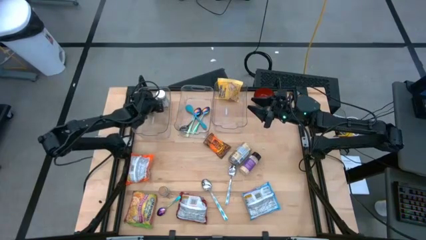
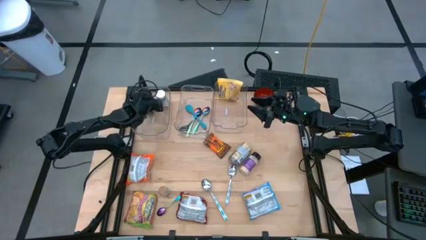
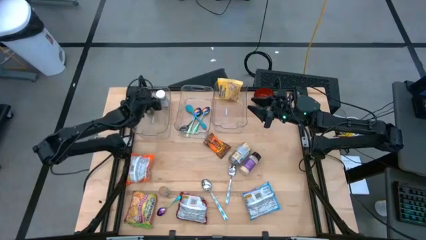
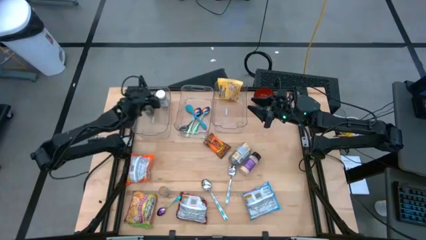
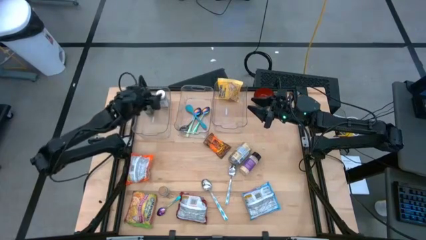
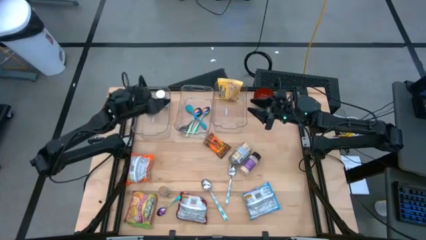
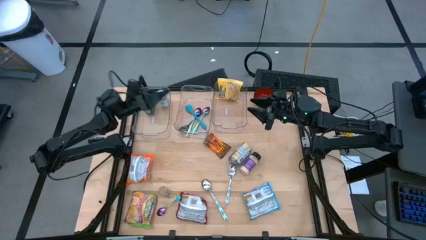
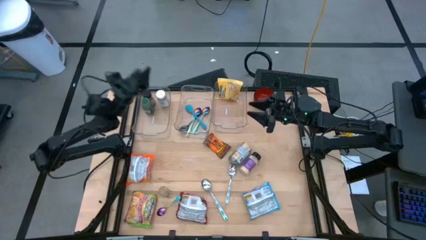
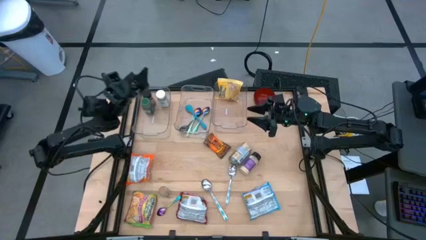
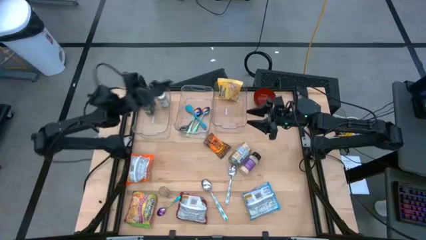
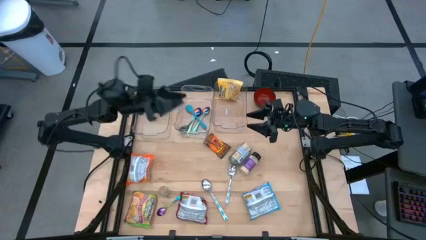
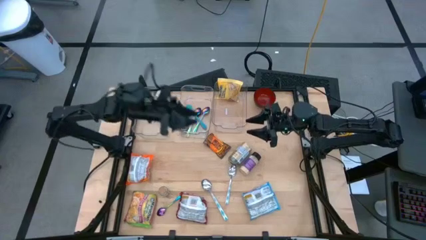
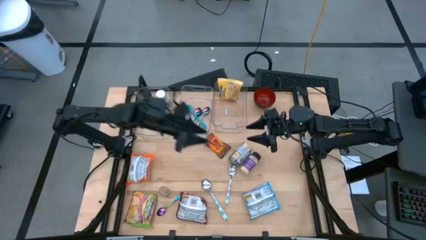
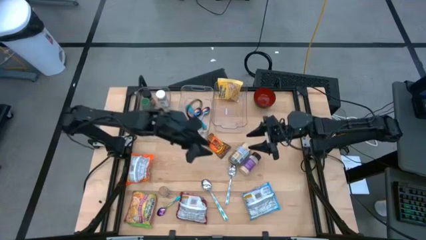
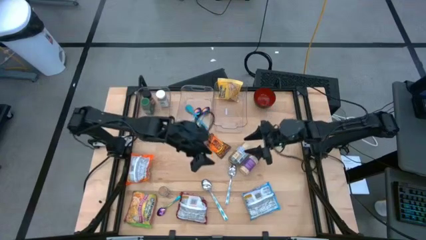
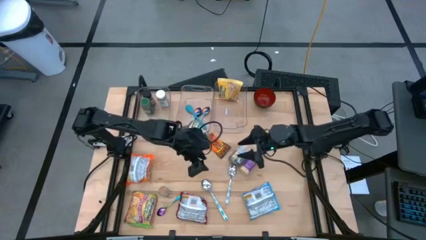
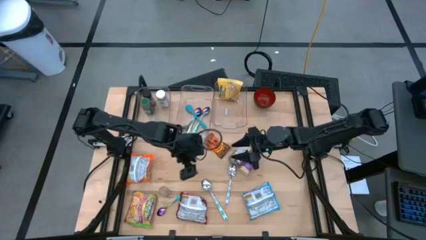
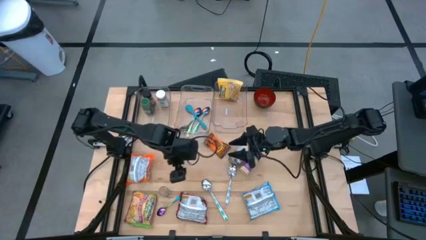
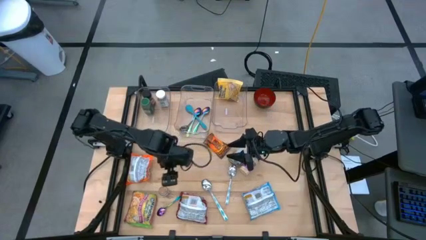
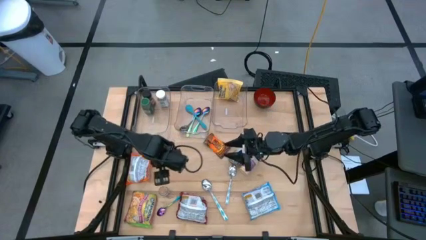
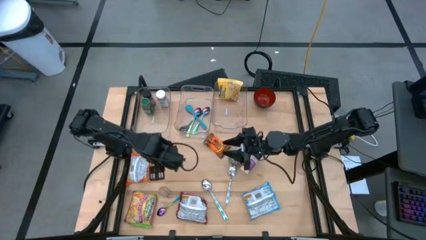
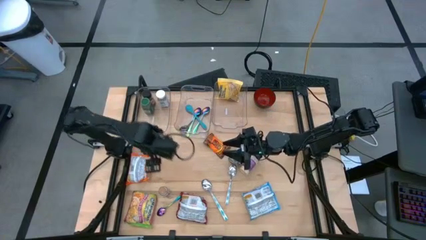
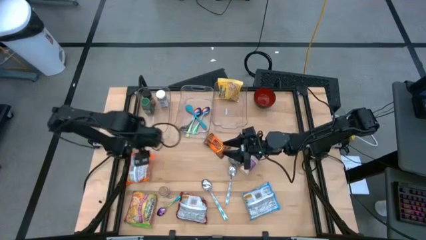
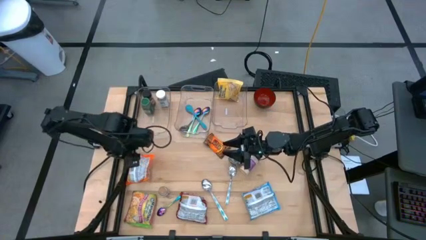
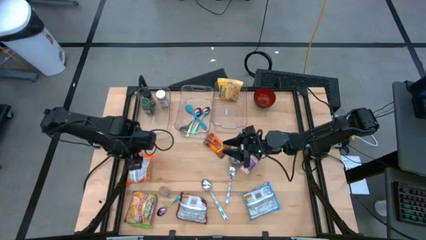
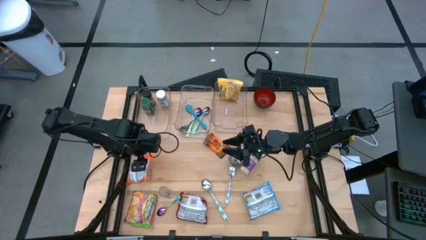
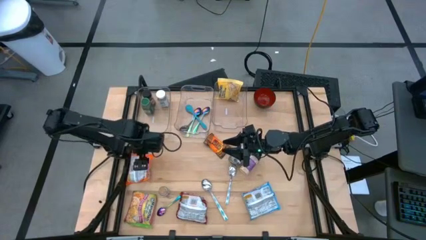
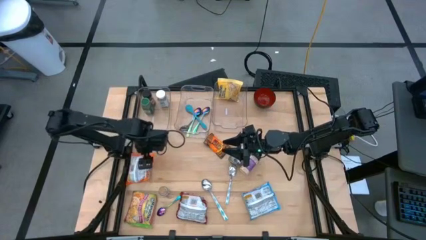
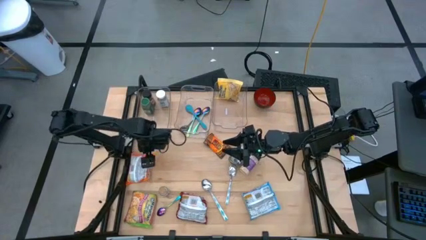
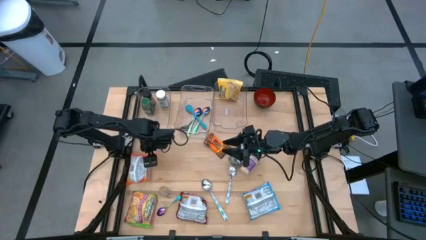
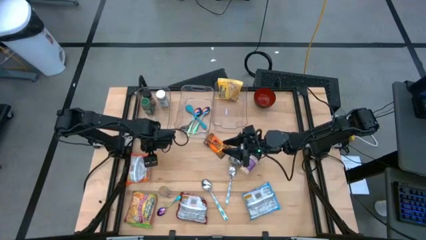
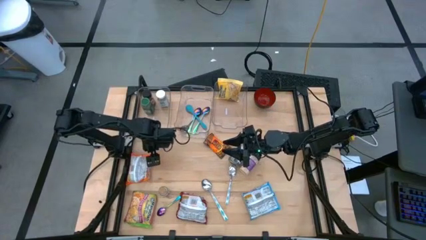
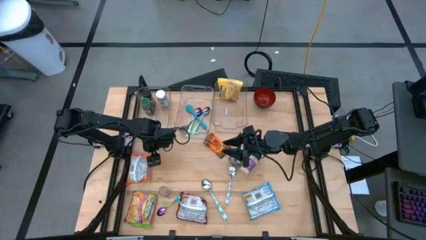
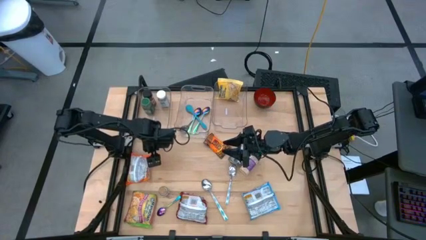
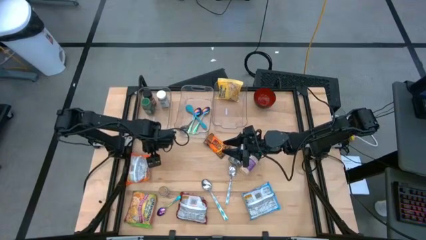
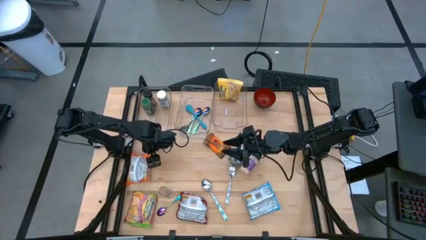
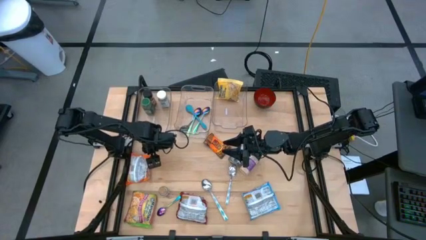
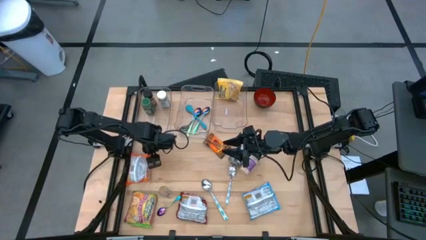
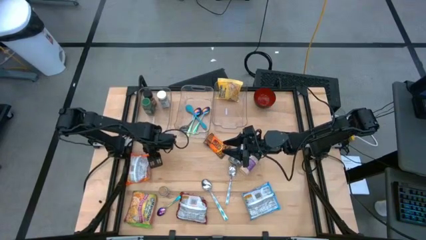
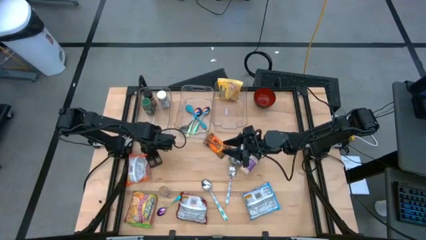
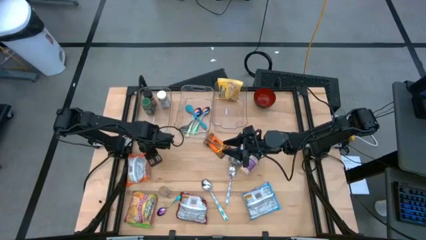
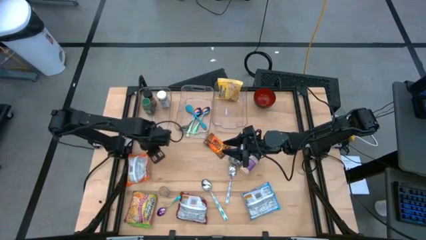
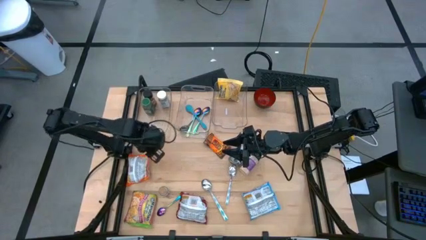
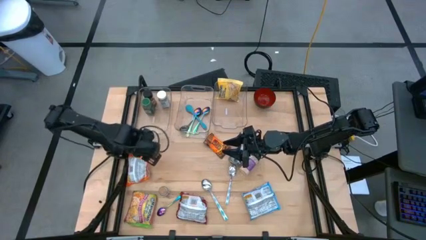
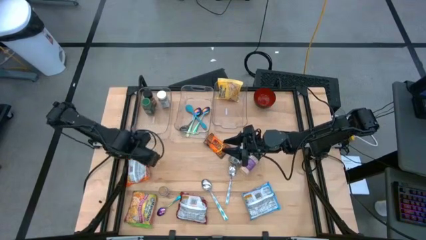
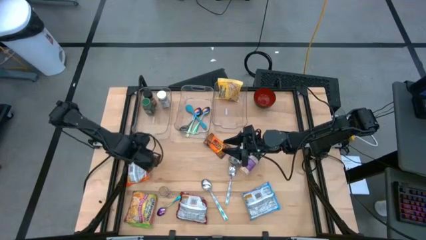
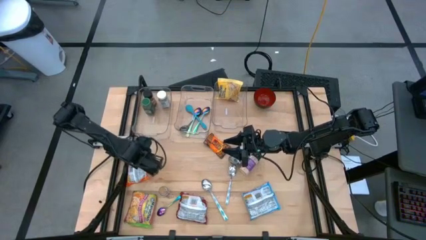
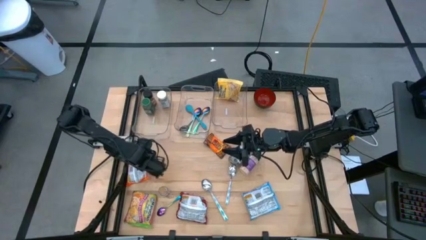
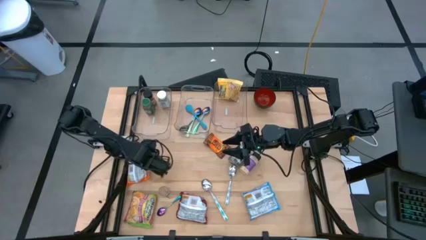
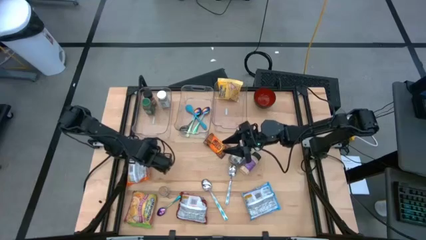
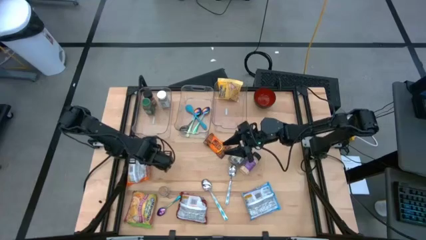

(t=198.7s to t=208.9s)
Task: Pick & Place Food Item
Put the orange noodle pack into the right transparent bin

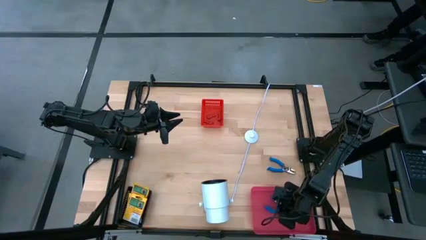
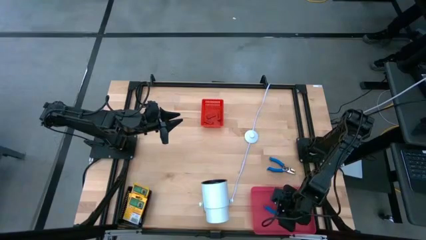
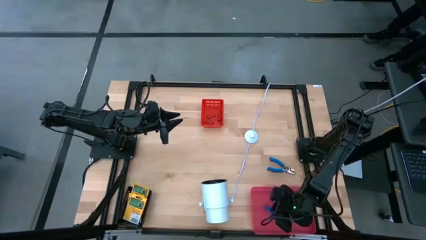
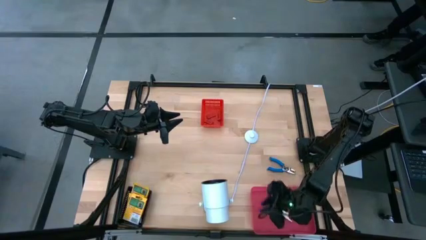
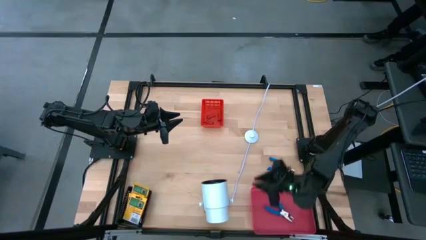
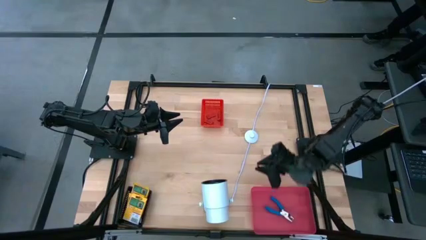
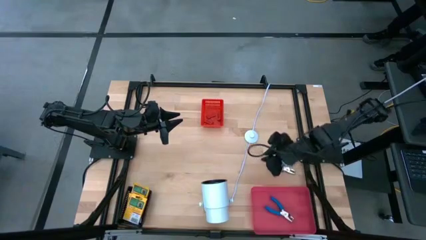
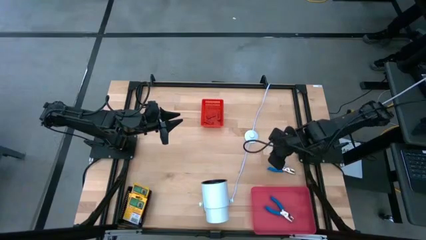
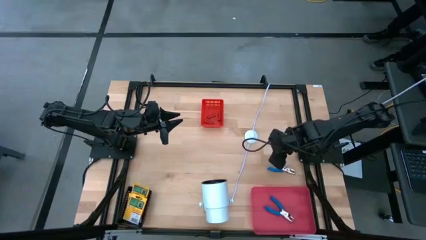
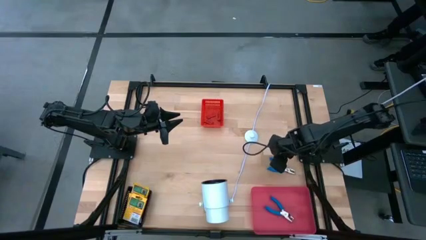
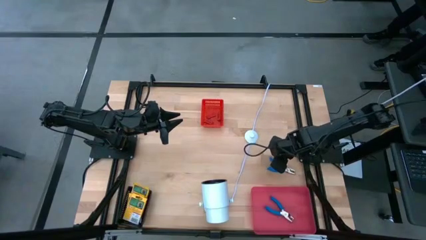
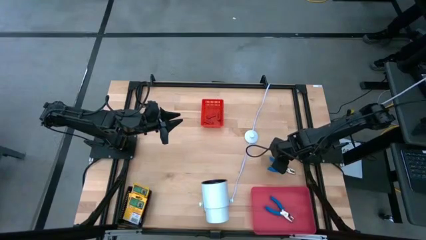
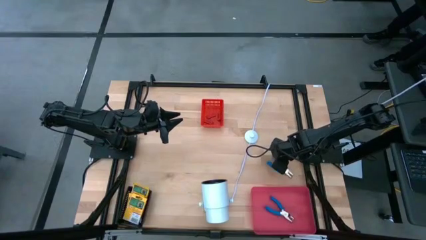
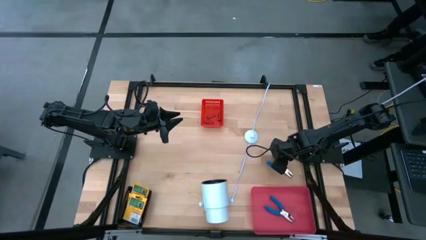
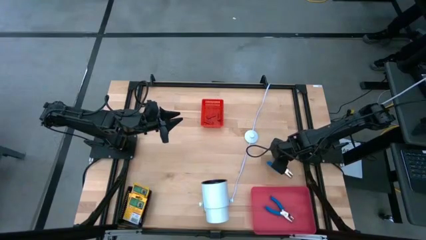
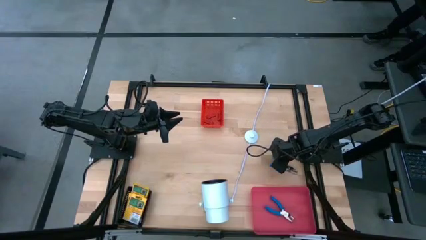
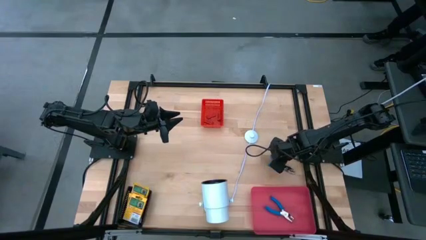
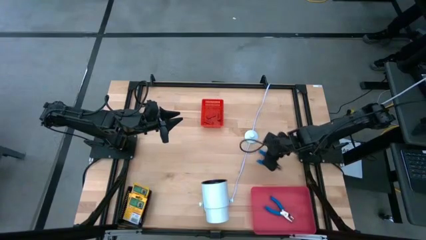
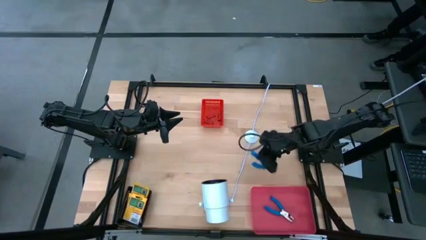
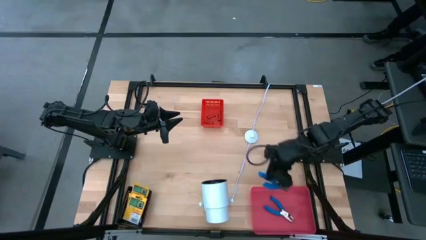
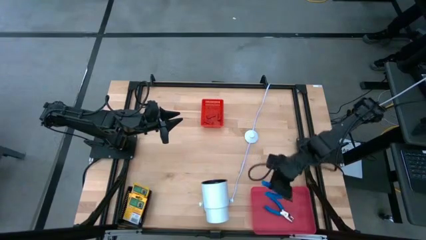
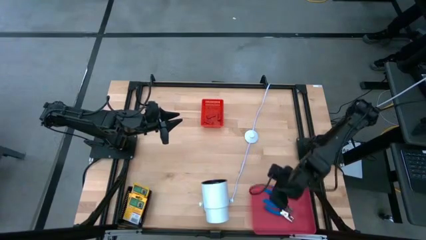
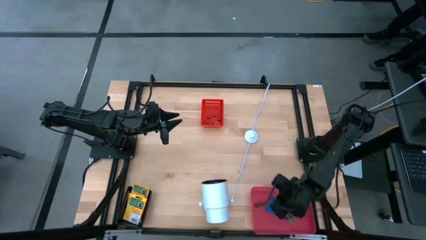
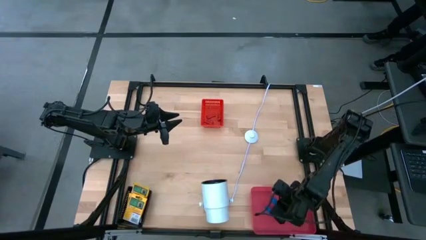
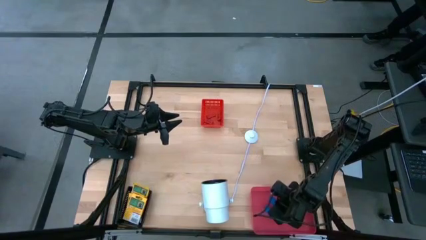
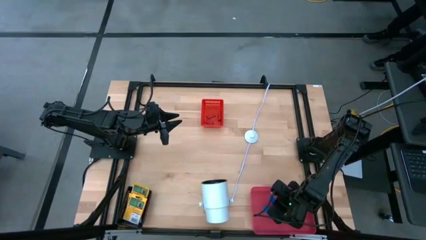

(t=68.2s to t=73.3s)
Task: Pick & Place School Supplies
Put the blue hole puncher into the pink bin
